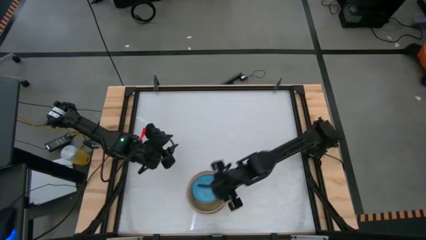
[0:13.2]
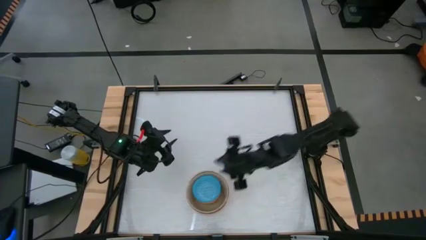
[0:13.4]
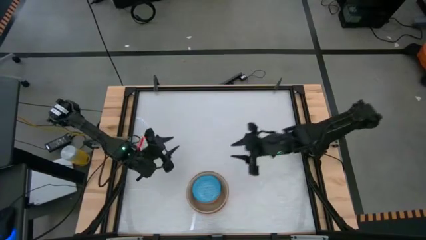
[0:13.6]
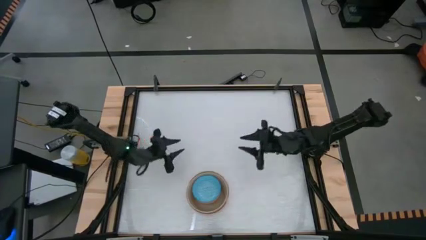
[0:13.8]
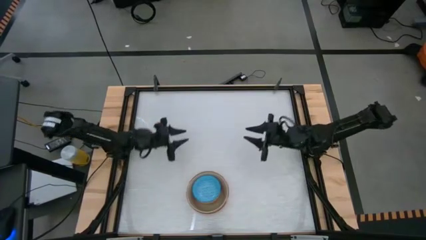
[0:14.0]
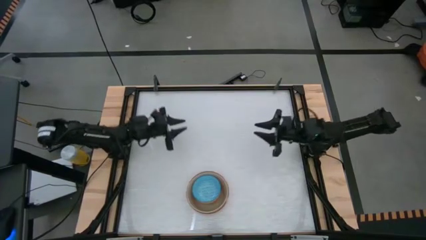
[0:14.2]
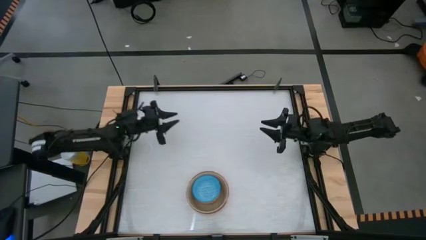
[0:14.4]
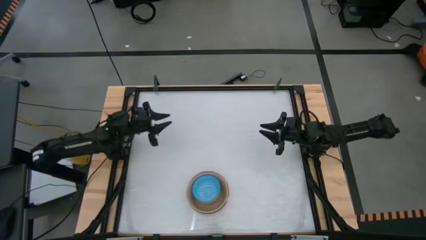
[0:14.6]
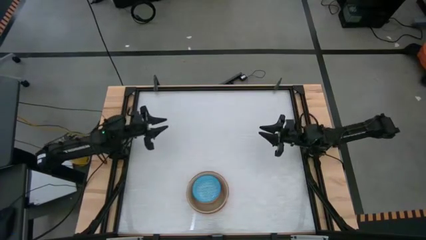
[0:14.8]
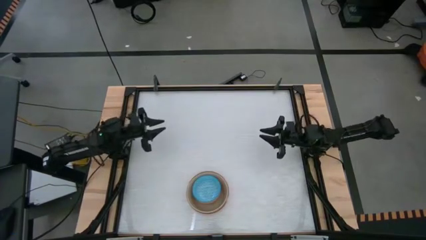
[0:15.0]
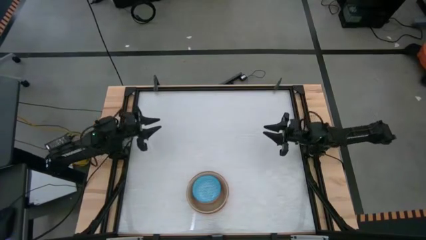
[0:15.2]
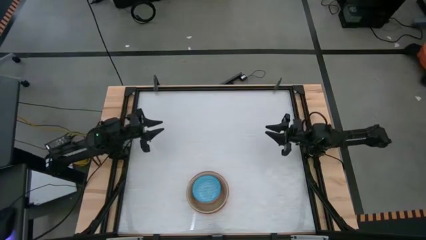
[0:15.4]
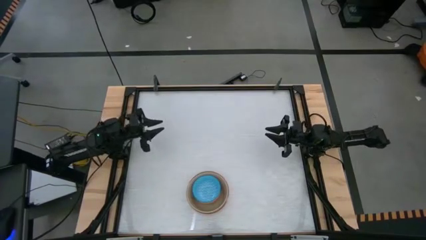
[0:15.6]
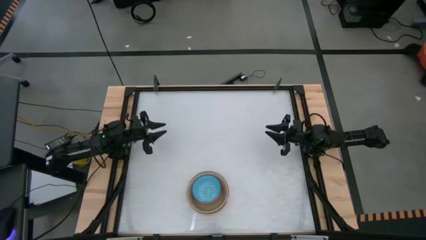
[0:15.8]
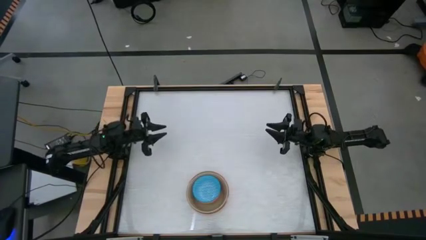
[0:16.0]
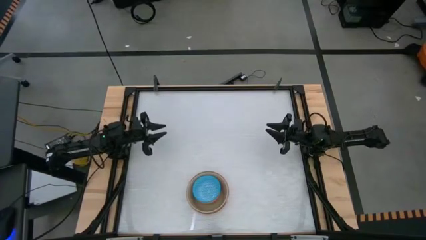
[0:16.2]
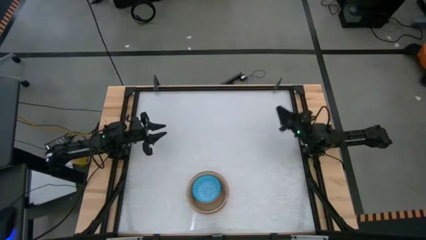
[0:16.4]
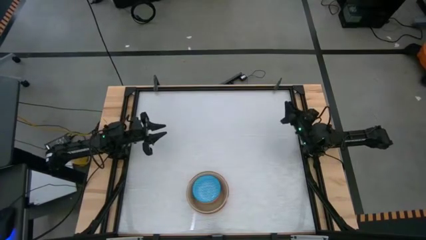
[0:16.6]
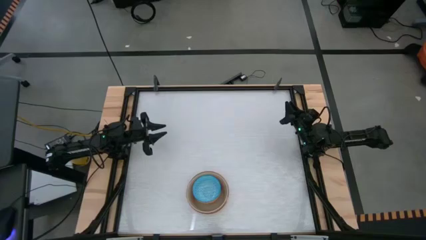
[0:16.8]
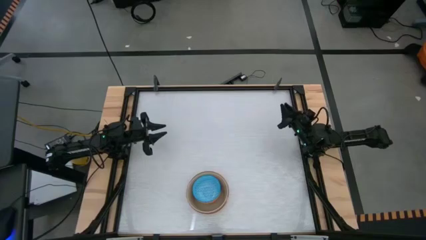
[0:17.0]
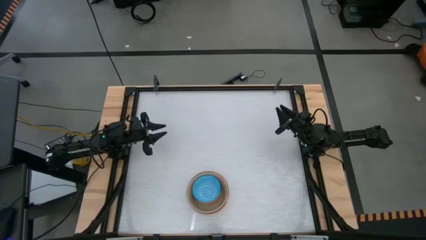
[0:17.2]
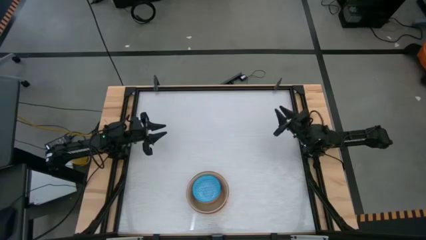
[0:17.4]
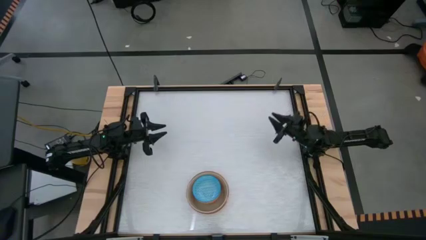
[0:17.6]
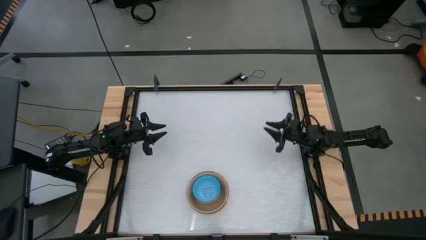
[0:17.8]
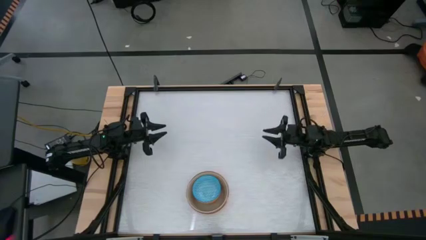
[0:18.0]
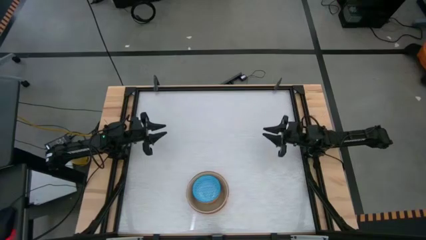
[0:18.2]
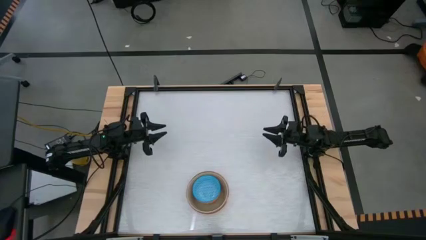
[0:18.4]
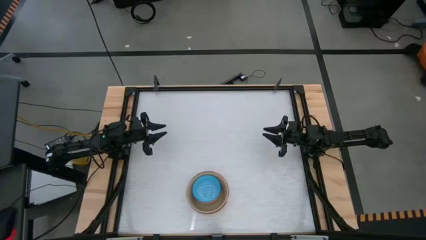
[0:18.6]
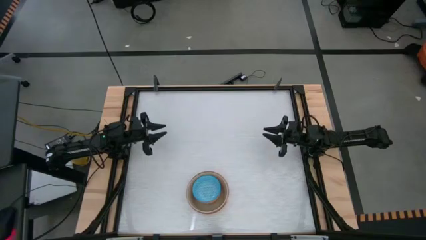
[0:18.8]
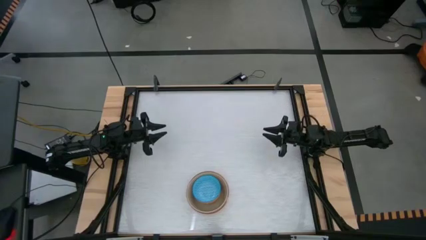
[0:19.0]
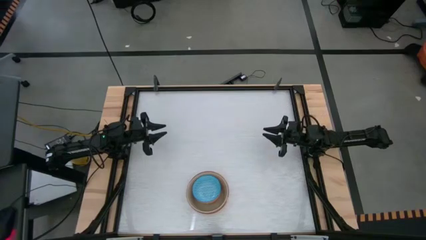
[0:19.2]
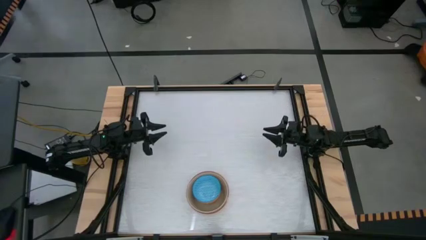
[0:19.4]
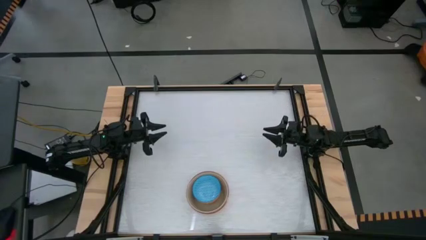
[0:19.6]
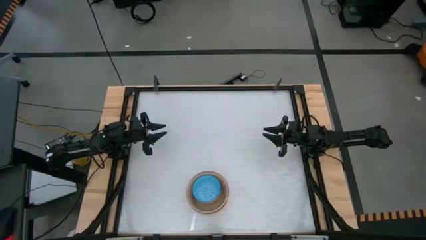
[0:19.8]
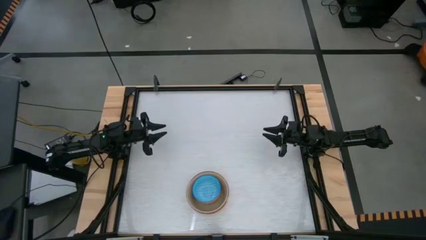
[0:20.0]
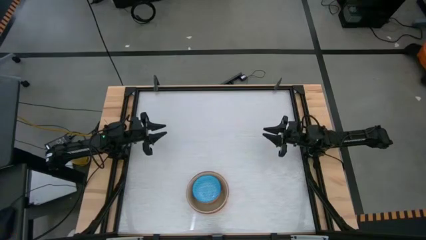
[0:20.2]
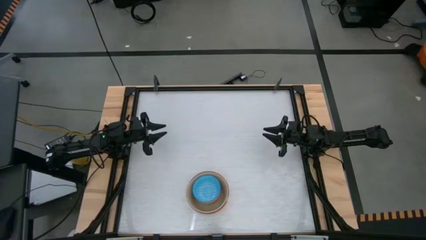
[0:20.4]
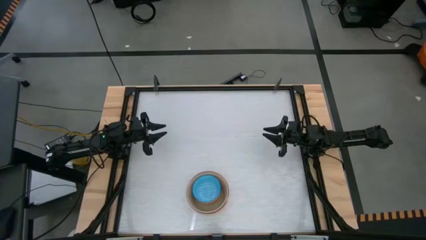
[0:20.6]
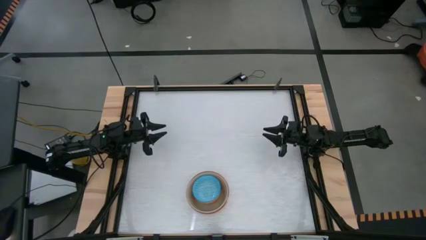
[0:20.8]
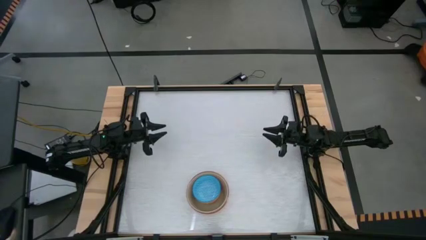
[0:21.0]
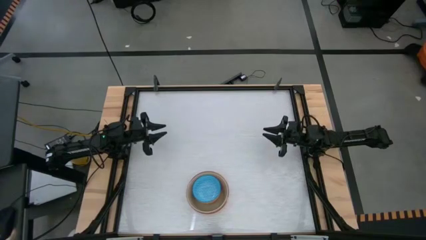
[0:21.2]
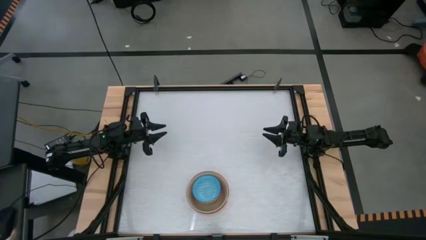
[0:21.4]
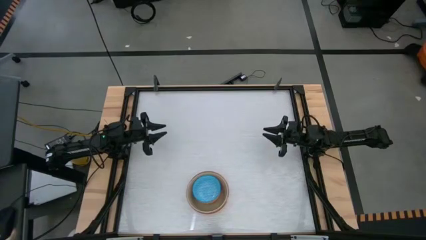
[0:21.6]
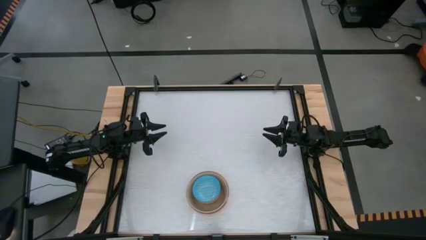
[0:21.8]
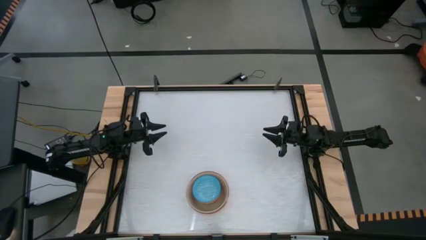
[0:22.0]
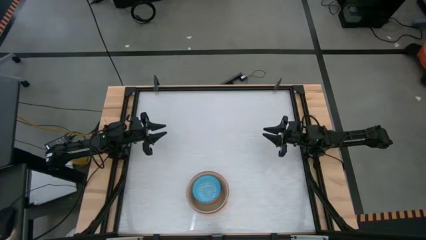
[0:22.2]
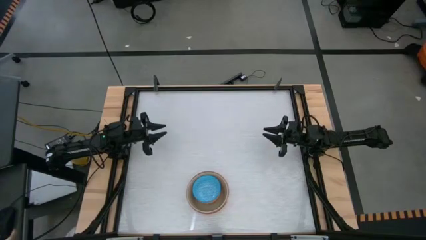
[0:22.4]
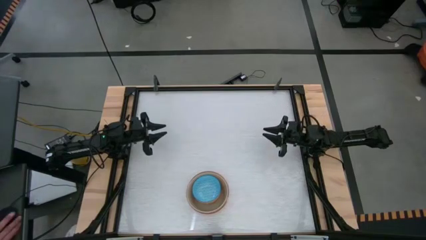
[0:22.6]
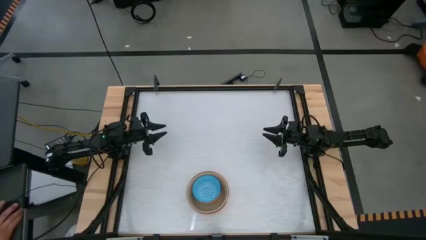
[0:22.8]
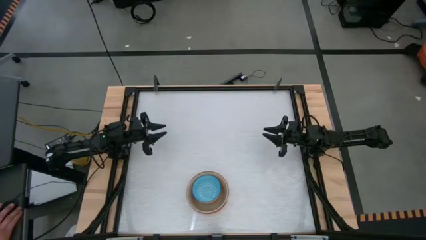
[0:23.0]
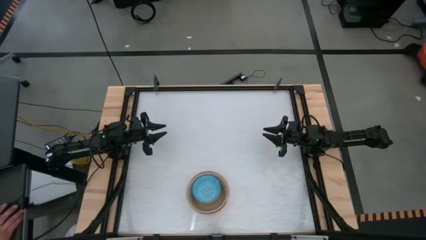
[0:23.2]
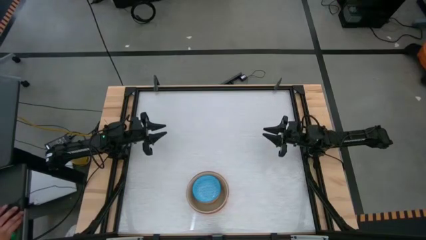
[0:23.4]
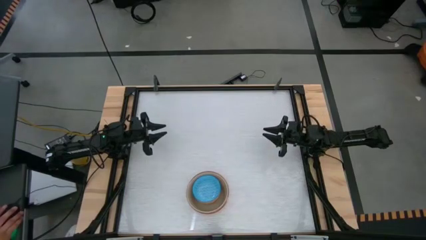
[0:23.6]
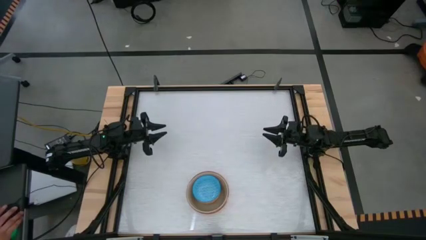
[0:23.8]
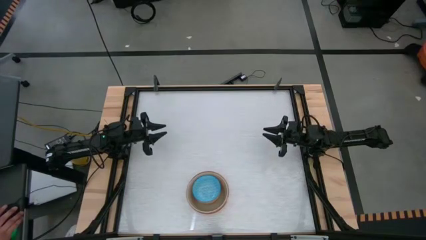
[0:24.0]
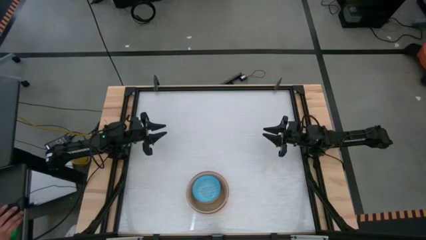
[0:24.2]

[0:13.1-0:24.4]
Return to Home Position

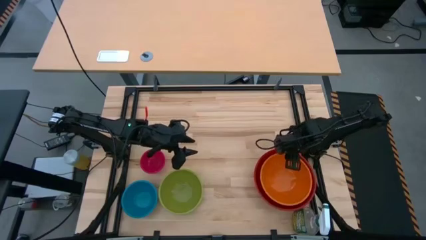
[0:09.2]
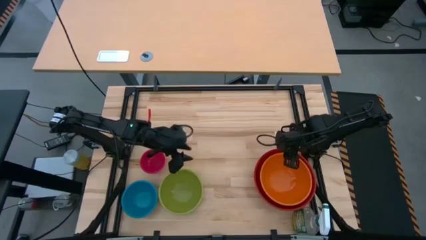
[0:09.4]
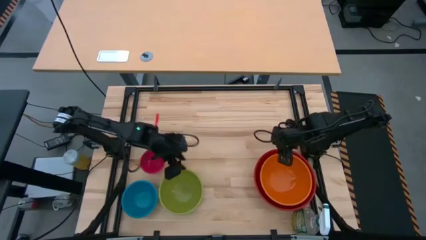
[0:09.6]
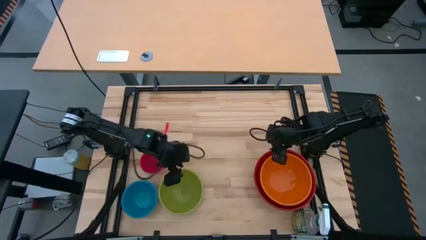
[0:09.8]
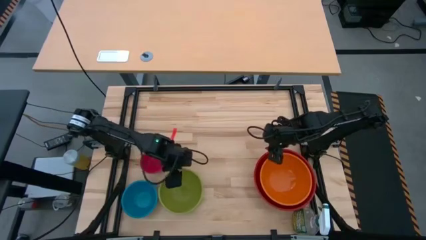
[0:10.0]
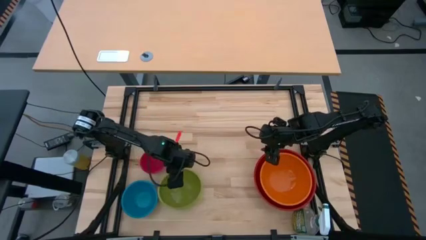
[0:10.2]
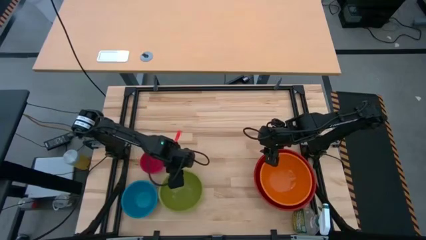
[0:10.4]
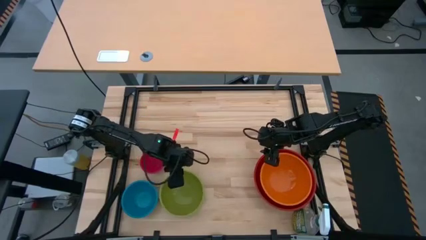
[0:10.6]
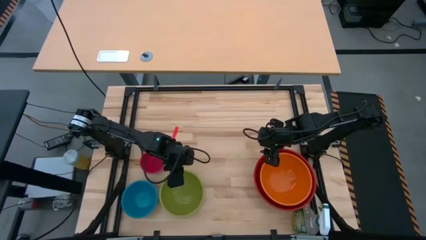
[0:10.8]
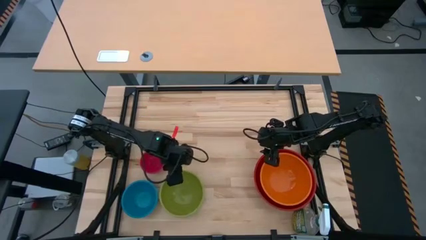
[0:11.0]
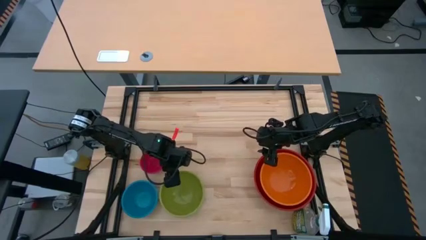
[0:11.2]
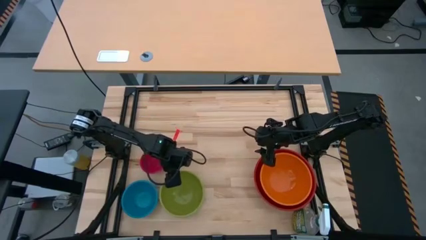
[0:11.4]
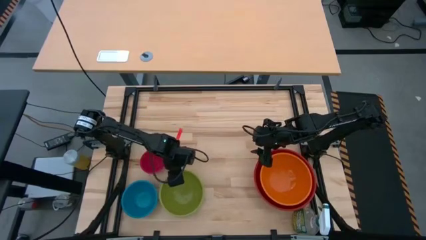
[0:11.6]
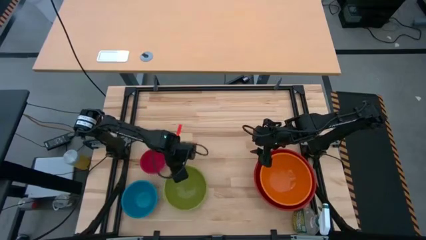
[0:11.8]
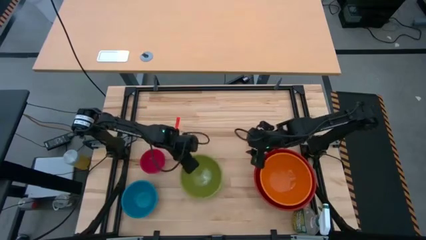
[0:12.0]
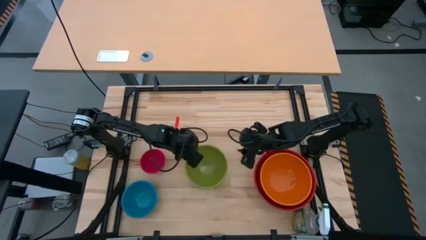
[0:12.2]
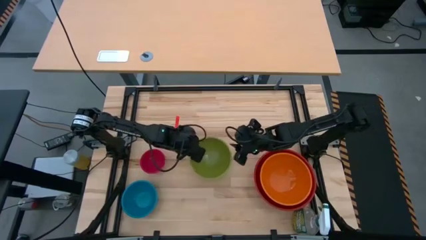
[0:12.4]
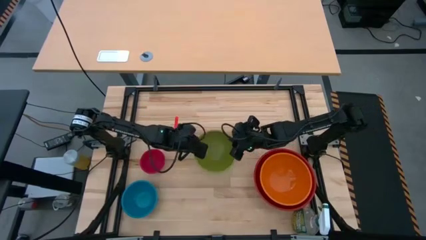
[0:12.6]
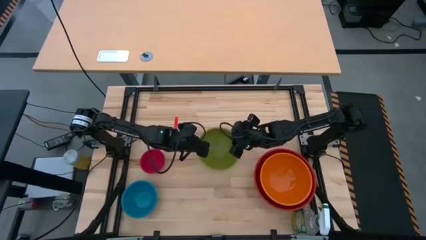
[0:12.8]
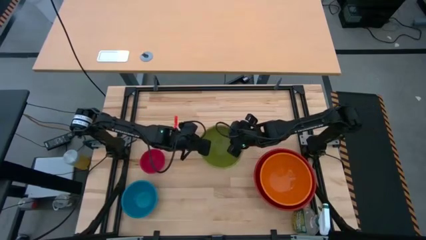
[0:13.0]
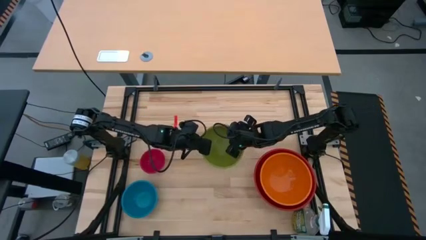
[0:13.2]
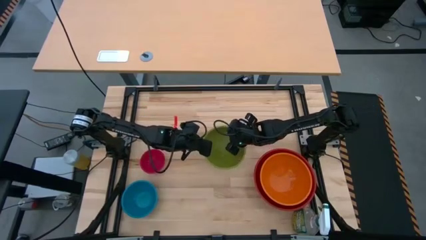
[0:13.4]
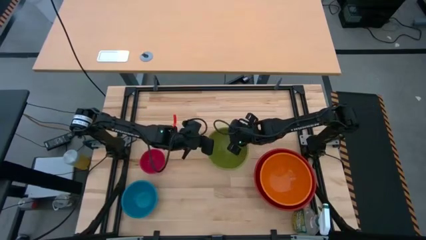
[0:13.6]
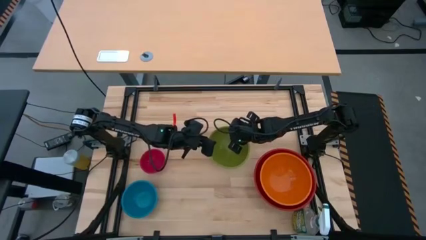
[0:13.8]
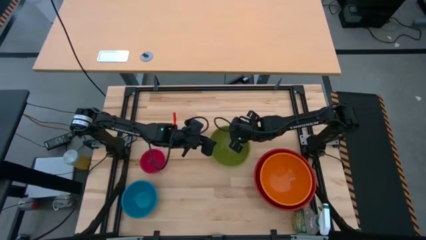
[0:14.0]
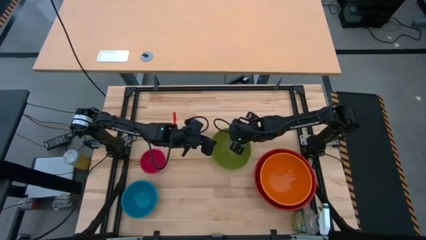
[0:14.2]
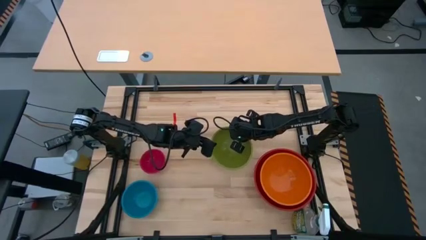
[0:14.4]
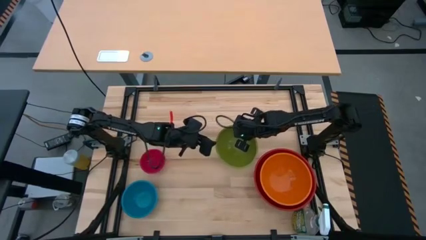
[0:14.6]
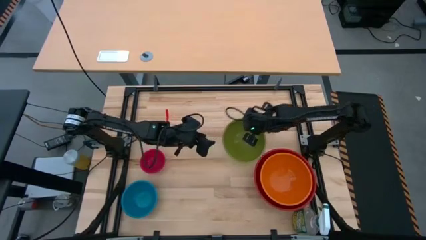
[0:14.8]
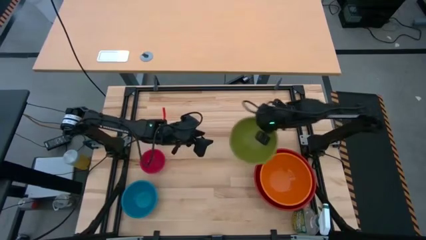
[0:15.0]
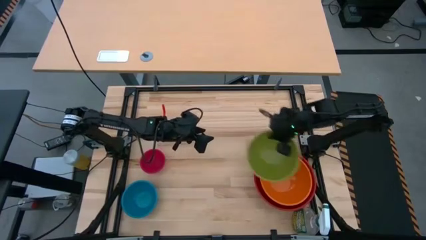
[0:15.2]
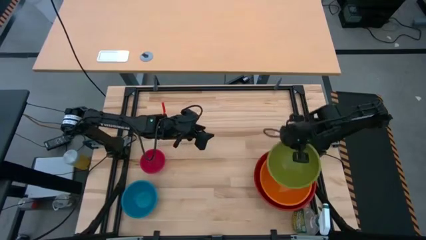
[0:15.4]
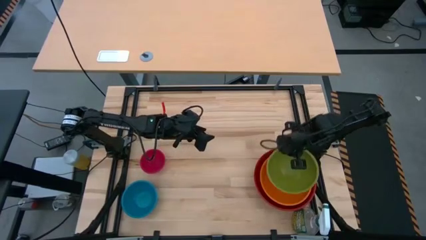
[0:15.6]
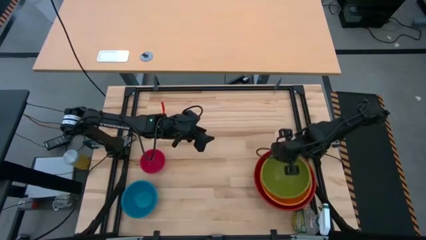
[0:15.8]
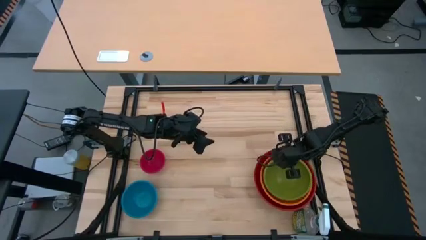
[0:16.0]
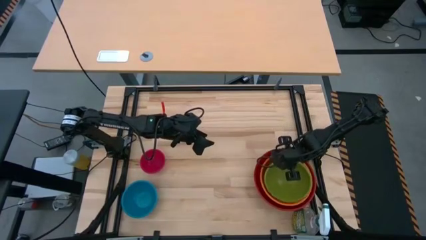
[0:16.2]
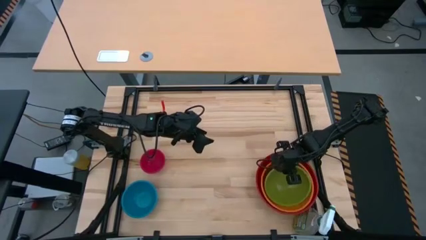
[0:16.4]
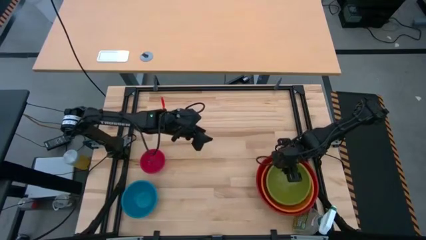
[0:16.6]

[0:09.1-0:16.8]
Stack the green bowl on top of the orange bowl
